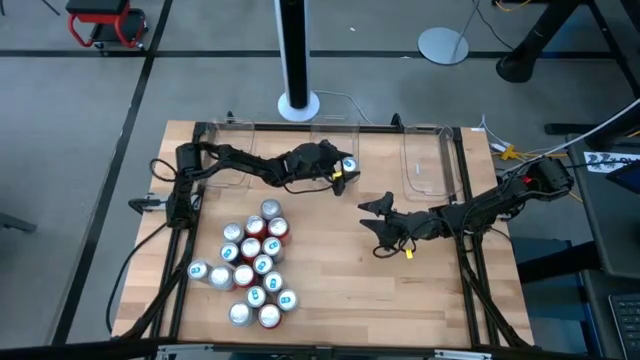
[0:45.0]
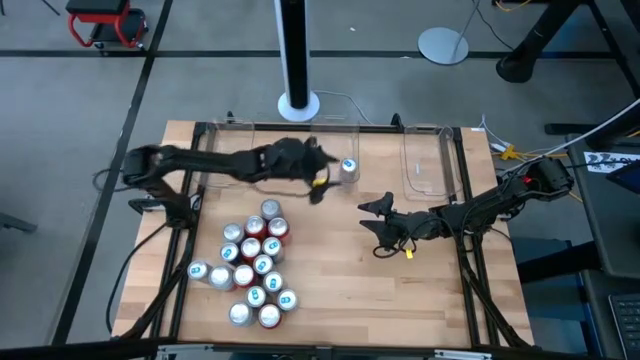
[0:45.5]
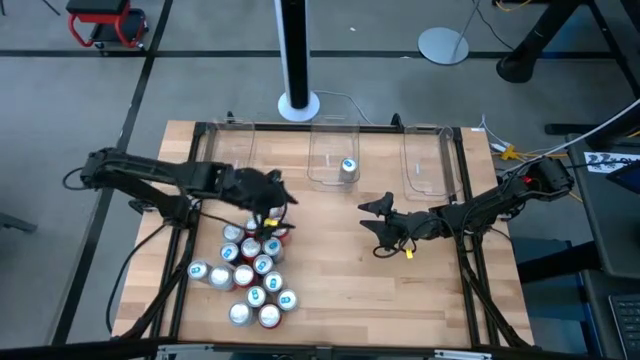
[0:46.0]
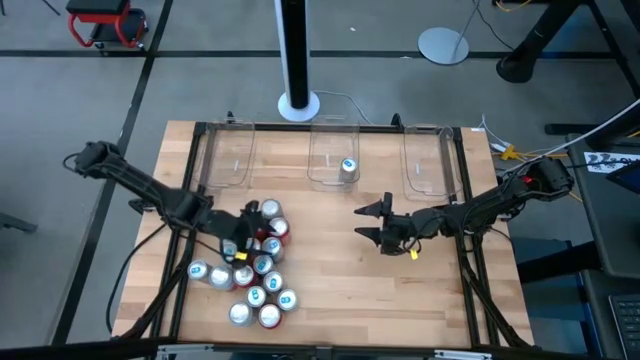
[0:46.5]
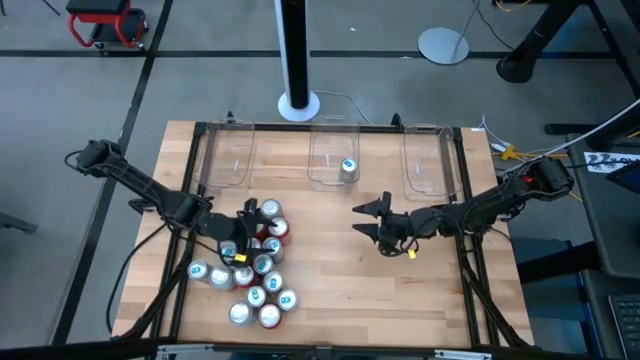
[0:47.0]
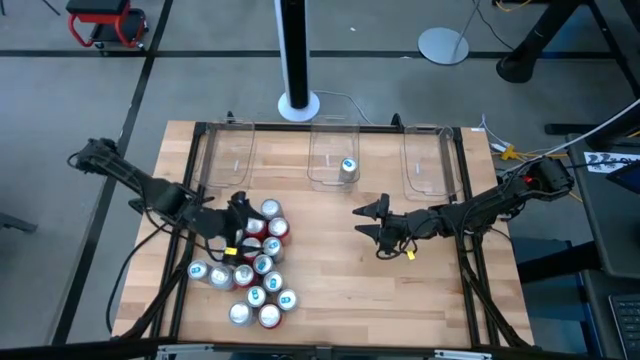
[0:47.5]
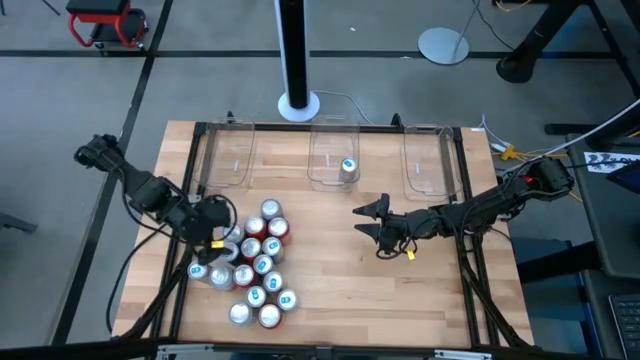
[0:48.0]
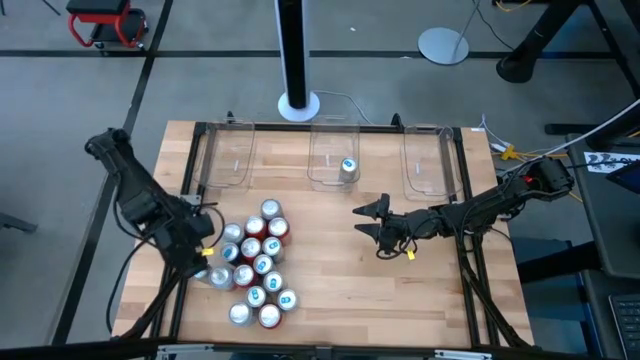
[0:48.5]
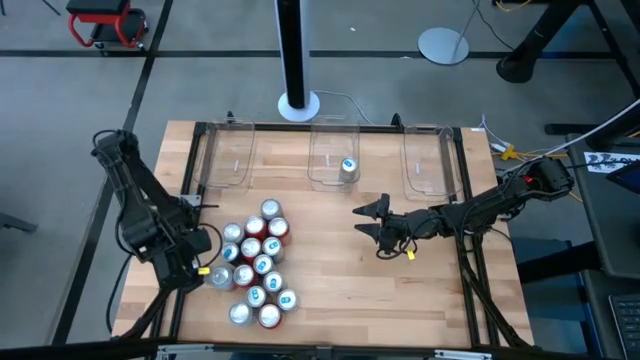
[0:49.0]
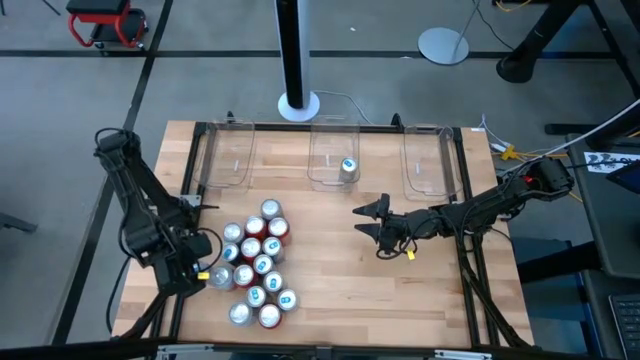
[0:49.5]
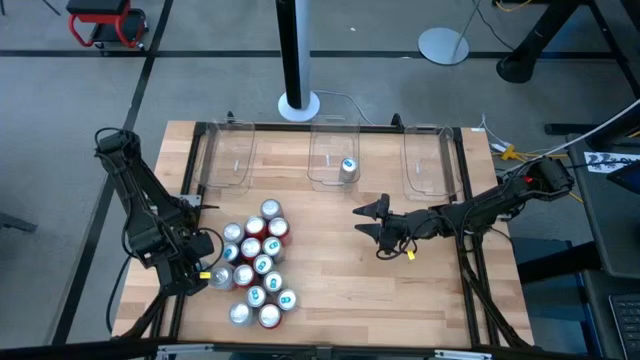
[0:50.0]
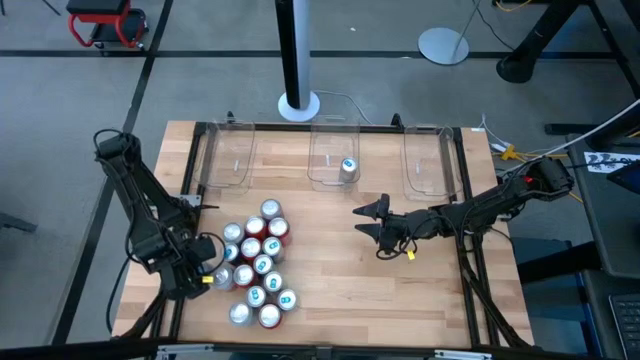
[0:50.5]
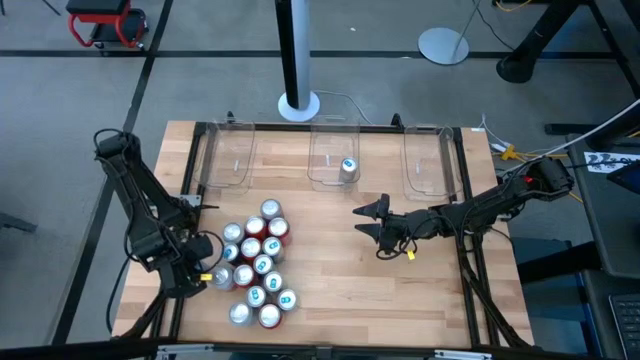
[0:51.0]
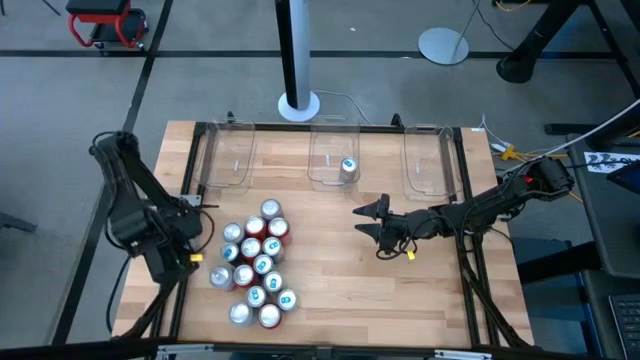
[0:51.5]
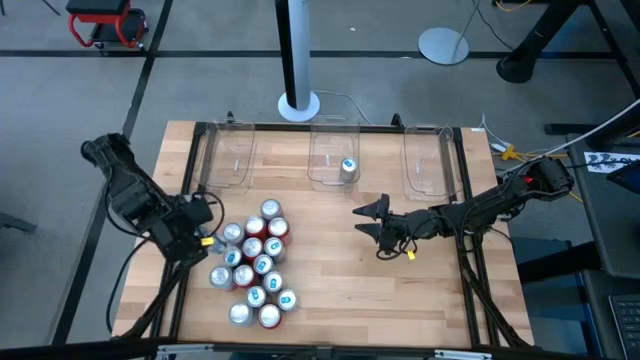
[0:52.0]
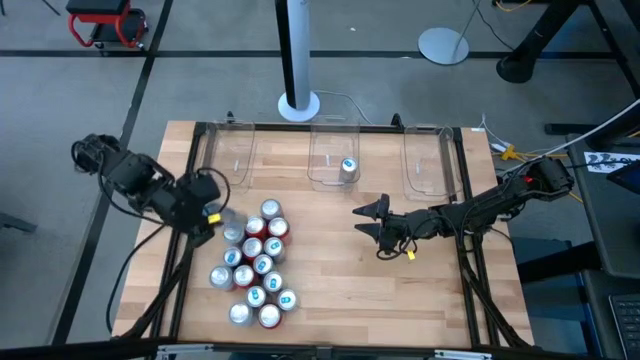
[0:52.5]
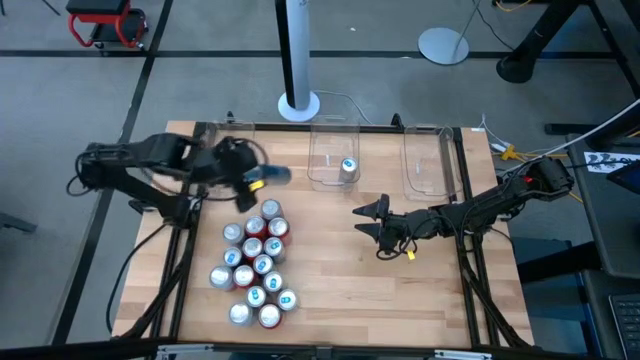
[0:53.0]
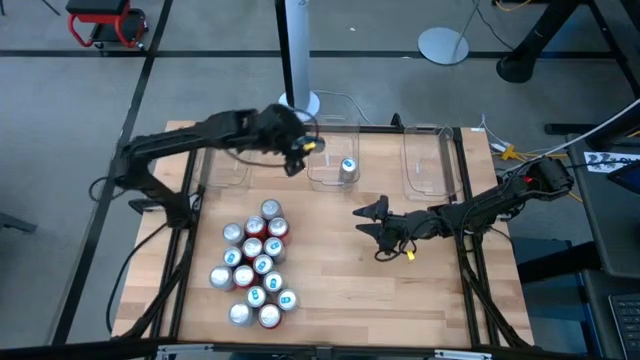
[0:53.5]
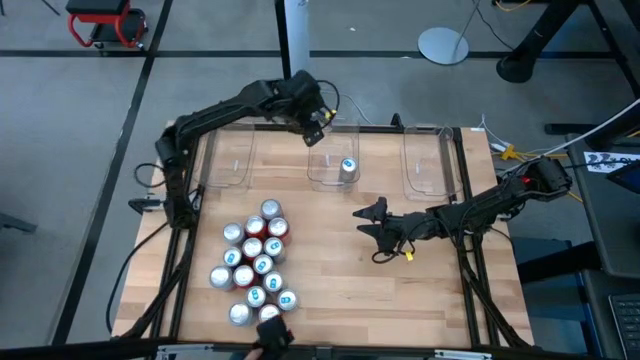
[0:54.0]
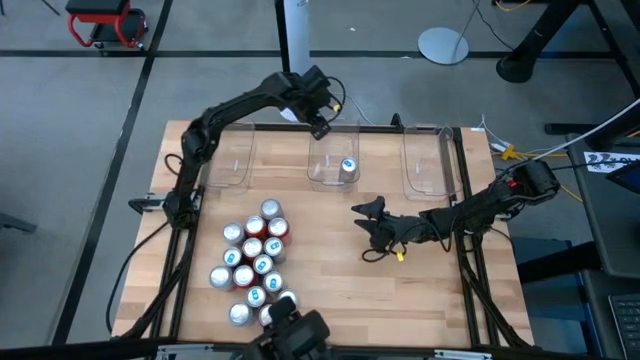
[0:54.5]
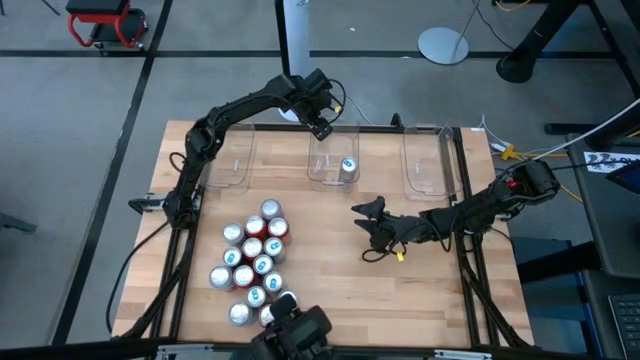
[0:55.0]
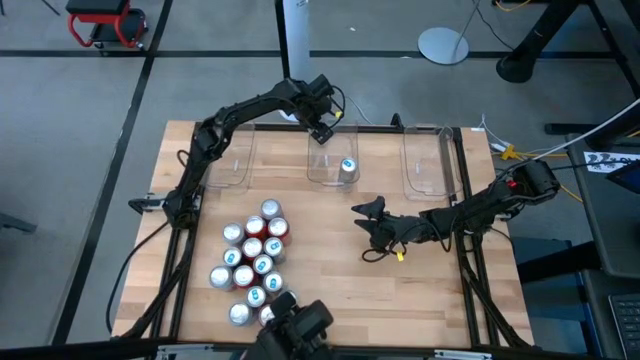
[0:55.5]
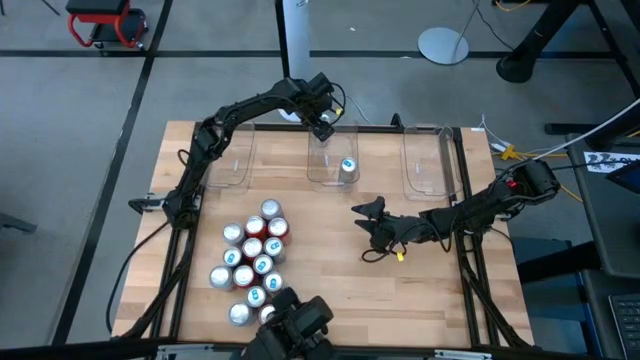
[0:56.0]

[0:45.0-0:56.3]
Task: Sort soda cans
Put the blue soda can into the middle transparent bin

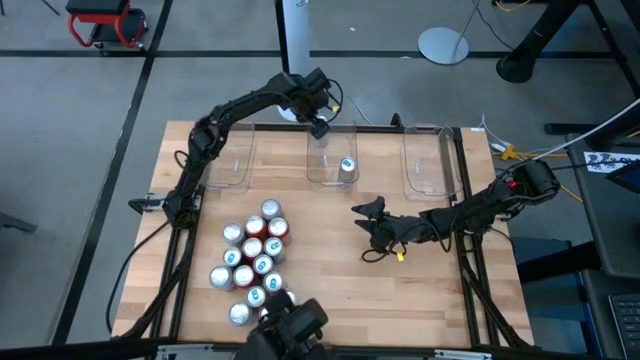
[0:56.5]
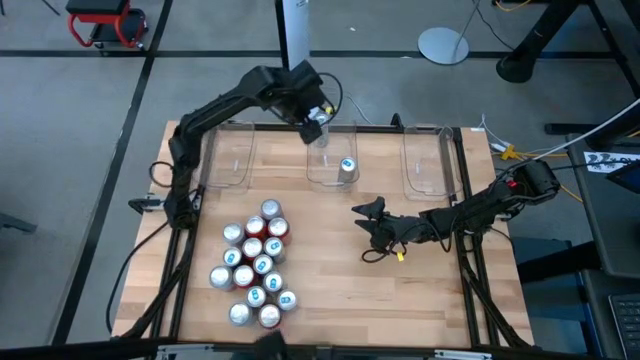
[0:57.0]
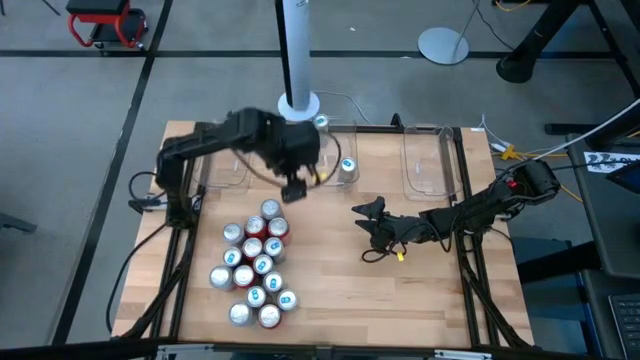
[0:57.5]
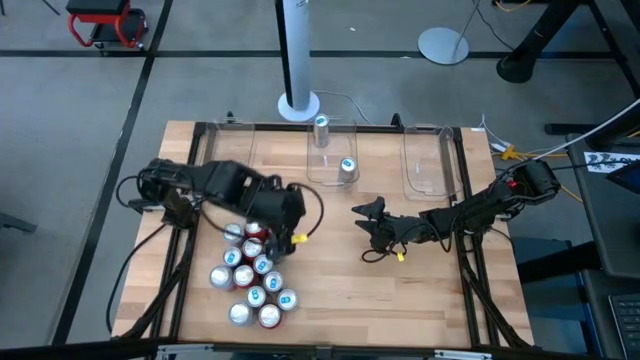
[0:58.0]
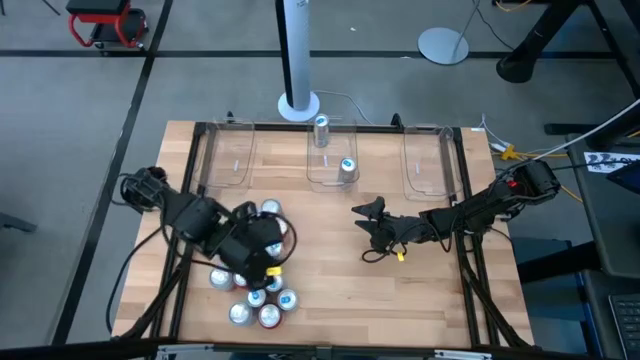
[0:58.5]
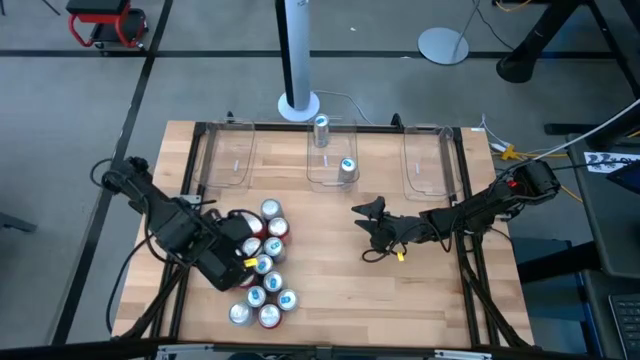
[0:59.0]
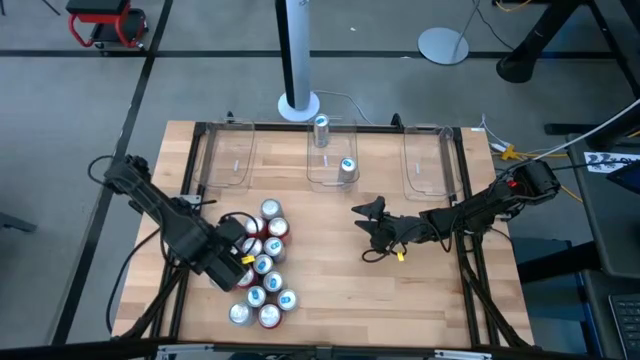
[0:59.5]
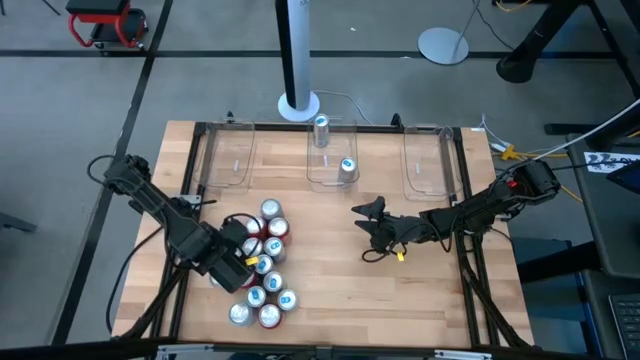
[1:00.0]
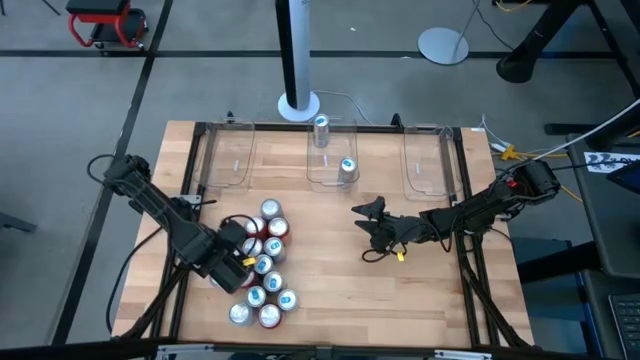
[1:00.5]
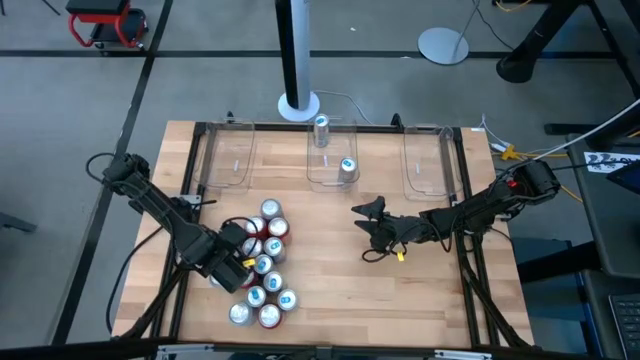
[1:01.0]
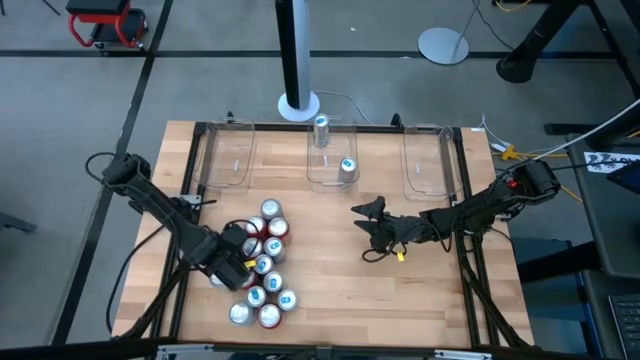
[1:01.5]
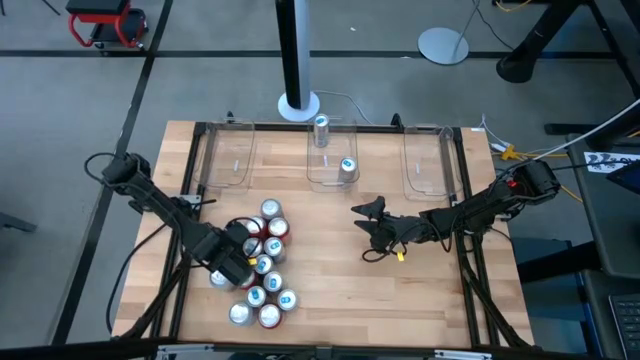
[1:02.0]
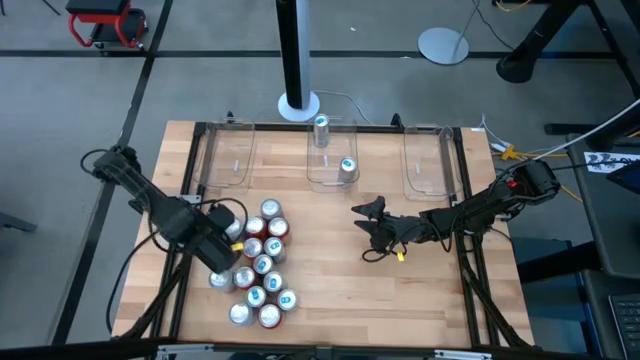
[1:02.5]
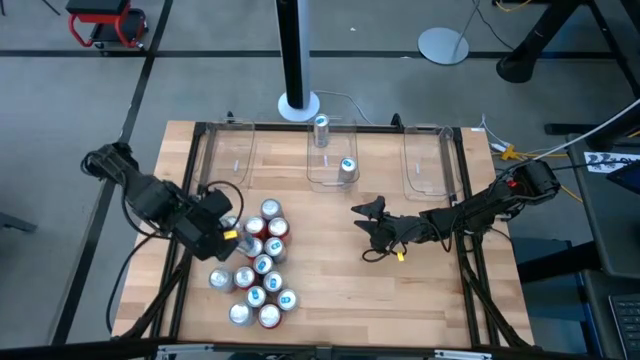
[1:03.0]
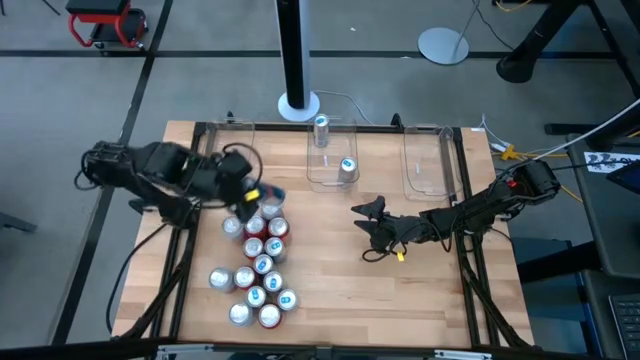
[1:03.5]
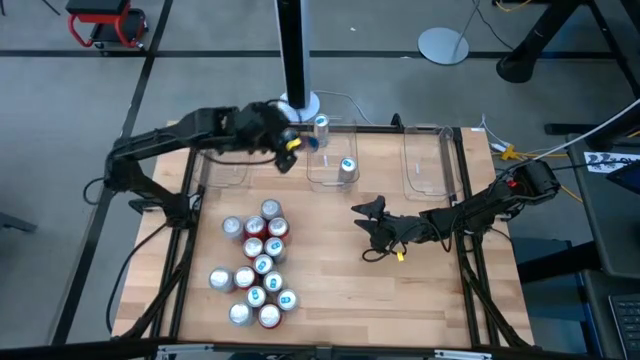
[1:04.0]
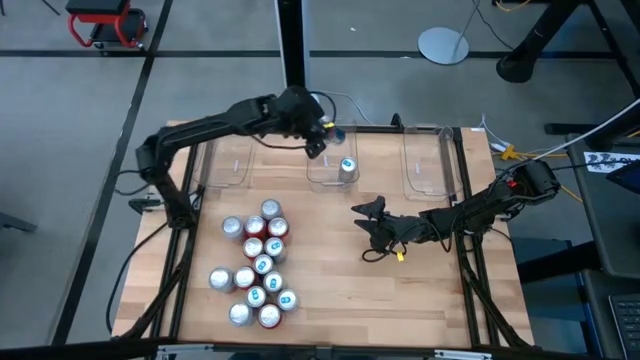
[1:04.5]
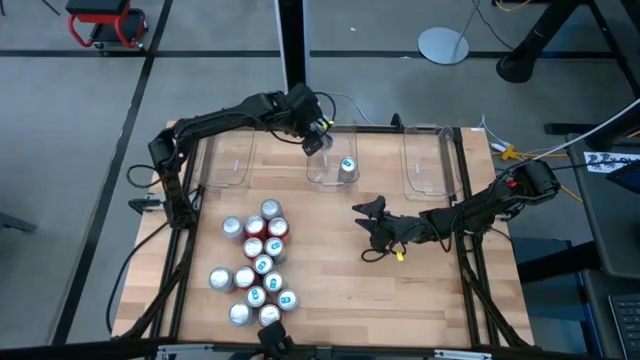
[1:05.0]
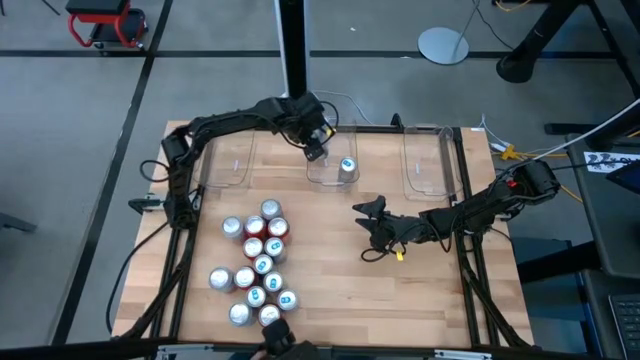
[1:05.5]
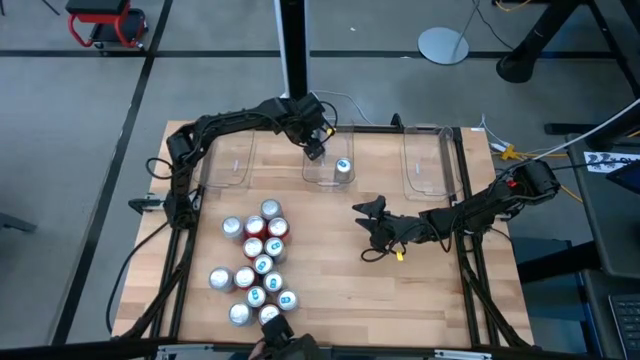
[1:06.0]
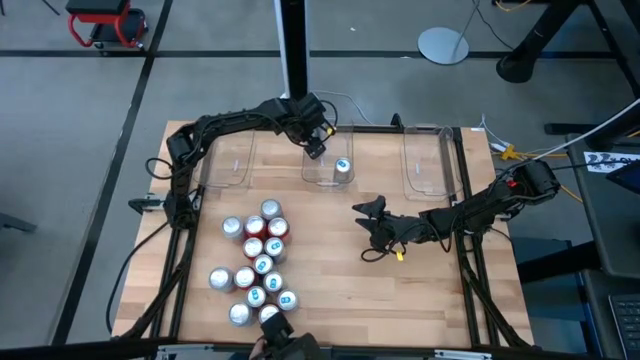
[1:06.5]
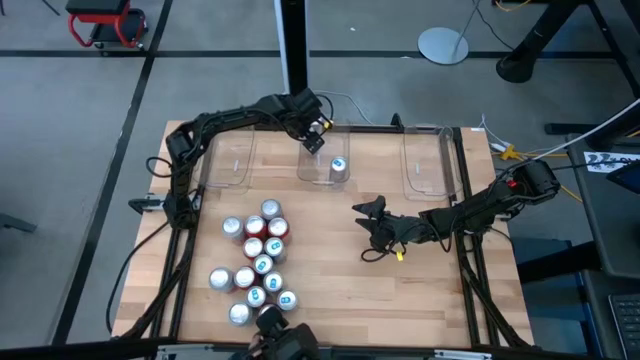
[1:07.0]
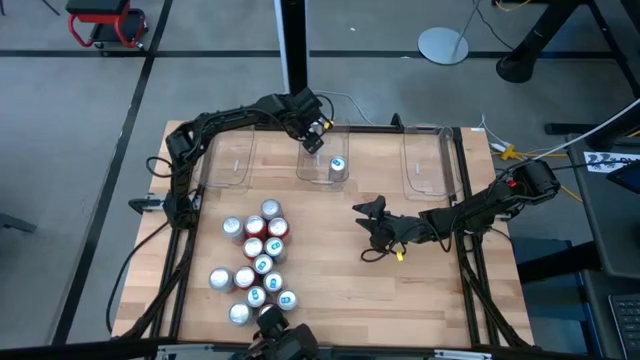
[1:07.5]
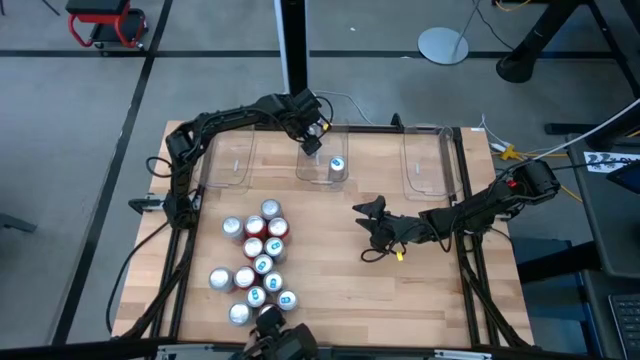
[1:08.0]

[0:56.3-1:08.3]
Put the blue soda can into the middle transparent bin
